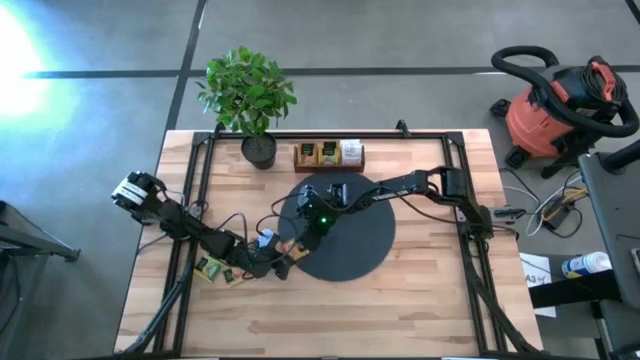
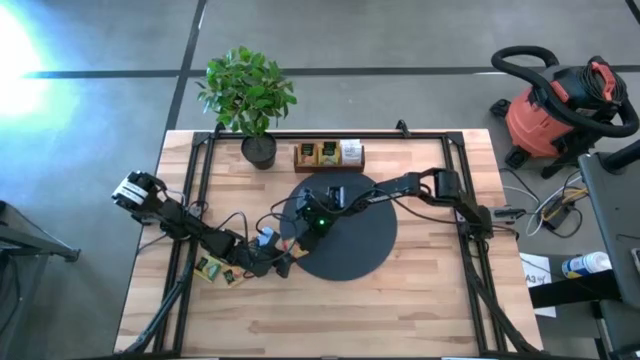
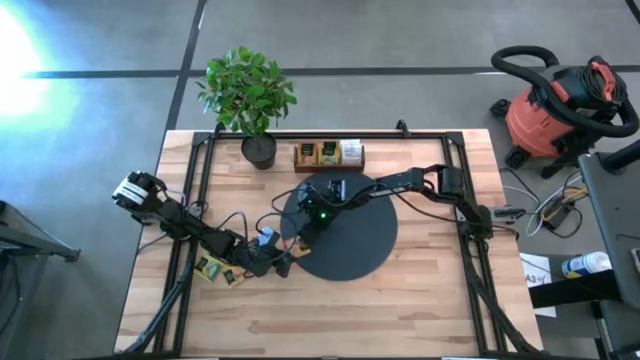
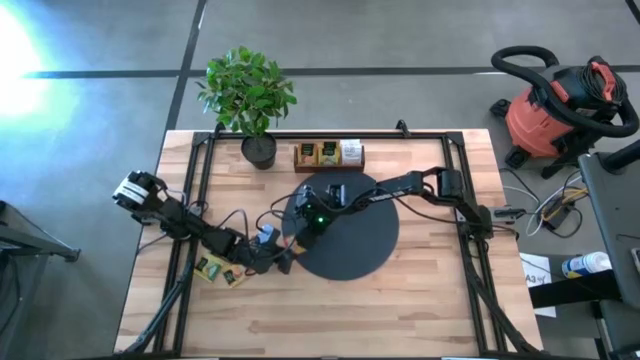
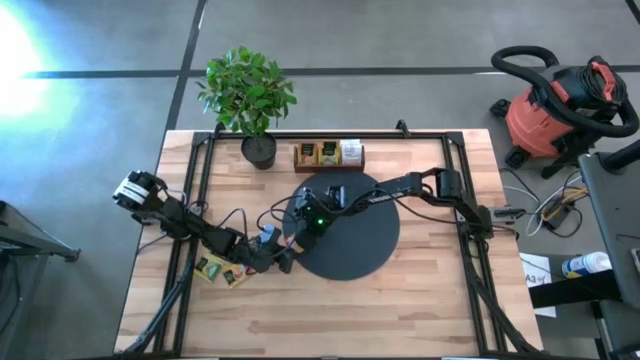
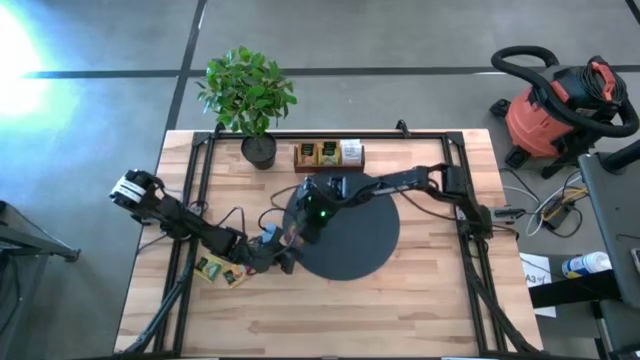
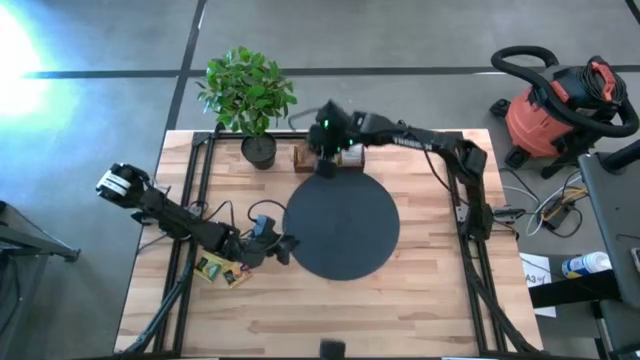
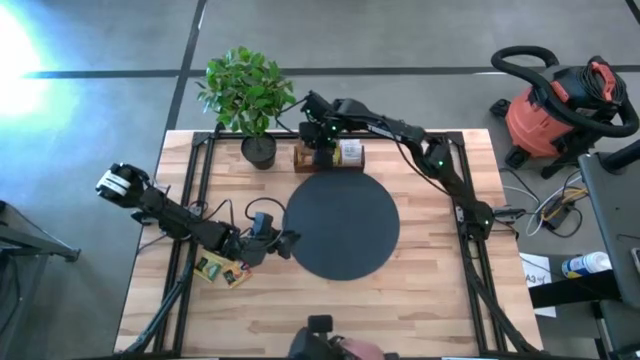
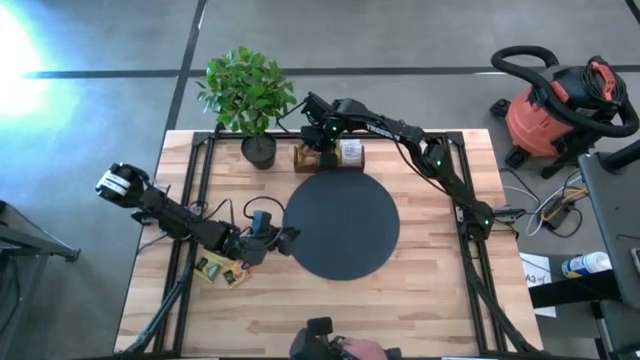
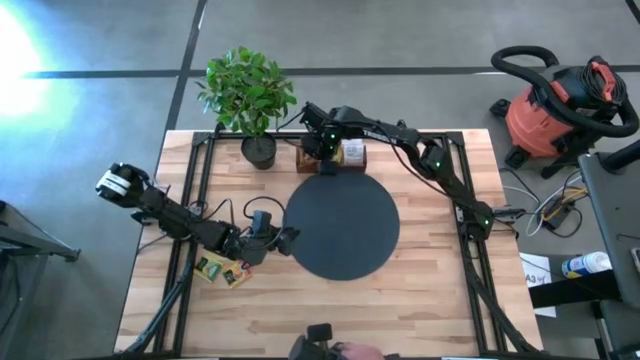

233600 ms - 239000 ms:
Task: Pick & Place Tea
Put the bottom orange tea bag into the left slot of the wooden organizer

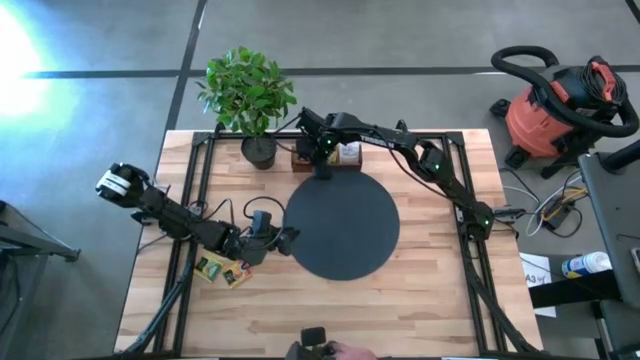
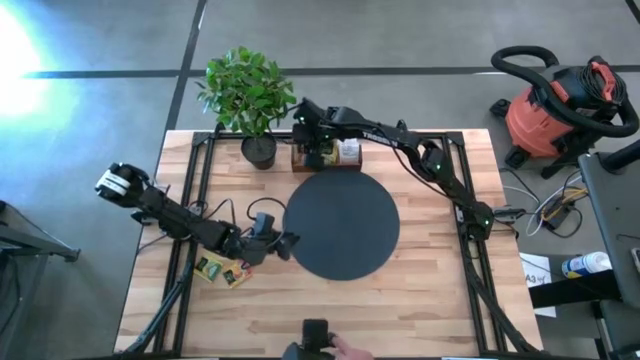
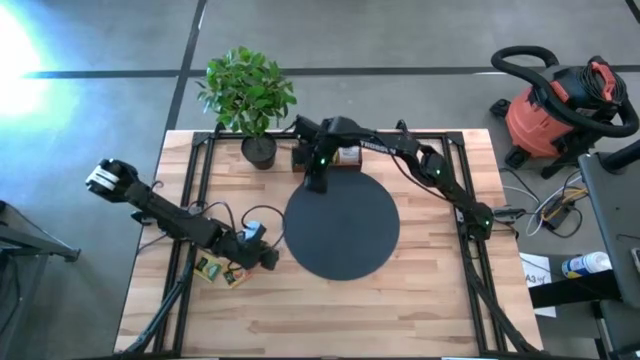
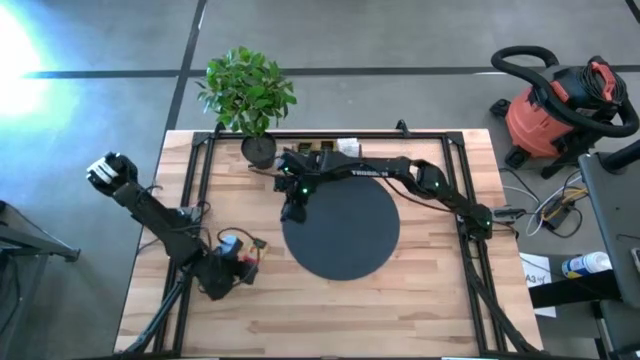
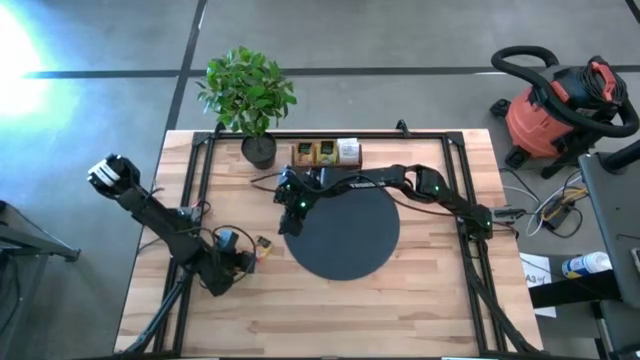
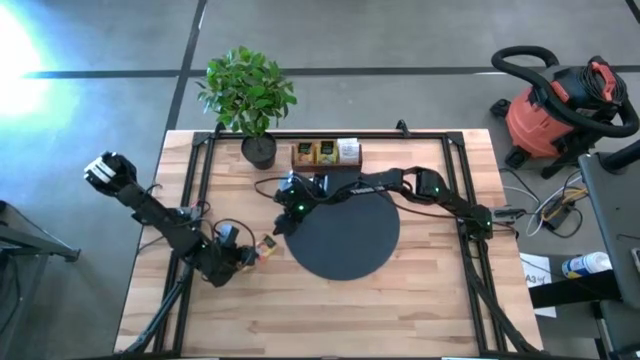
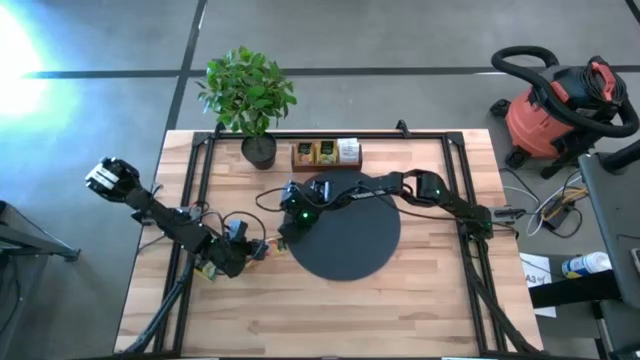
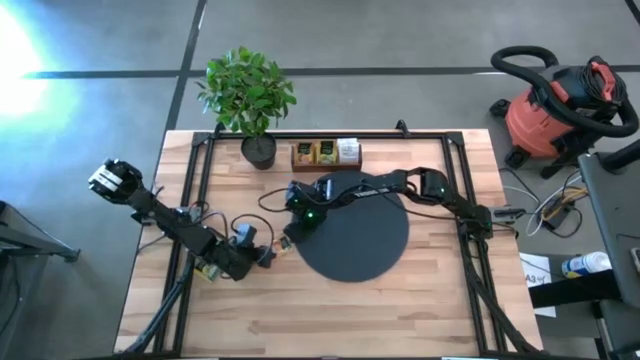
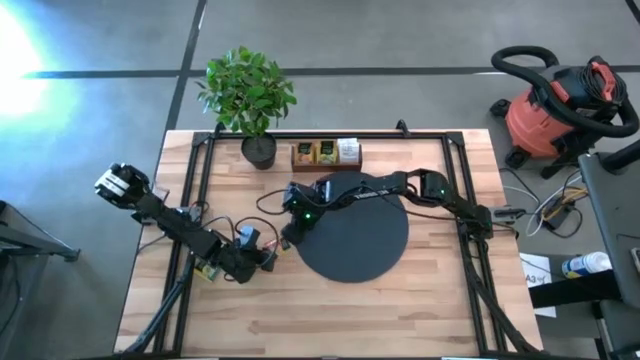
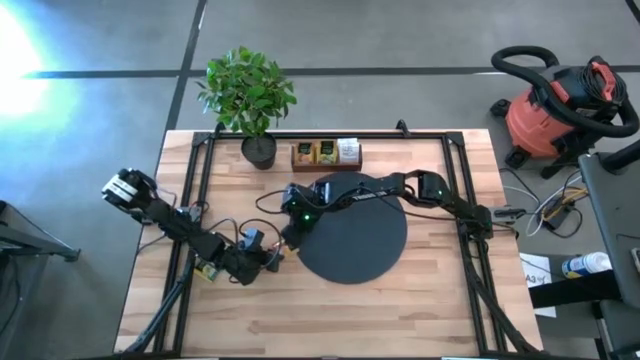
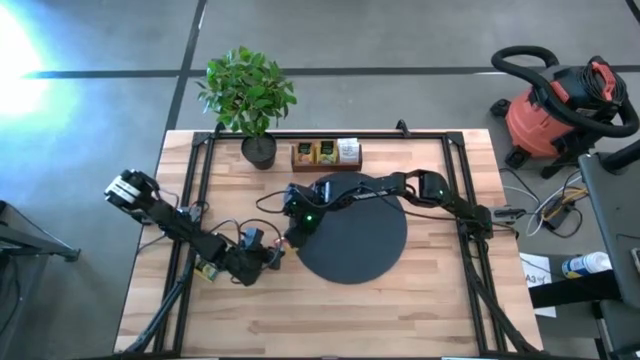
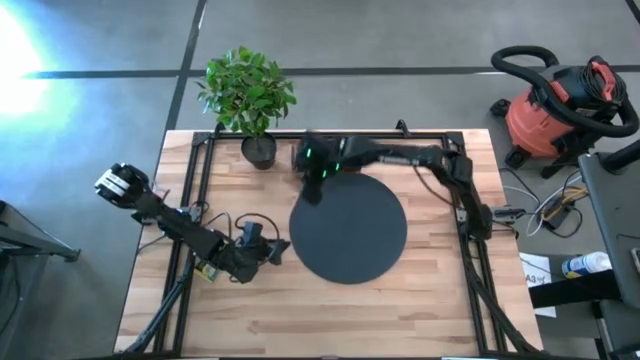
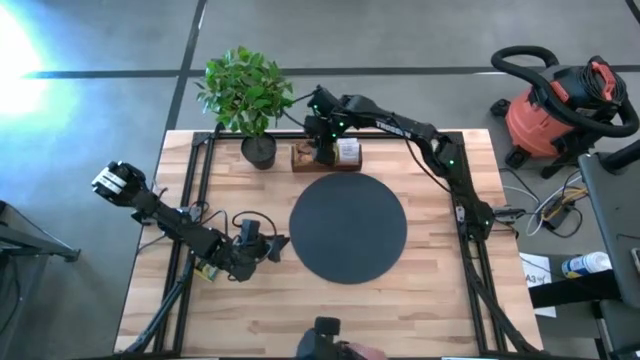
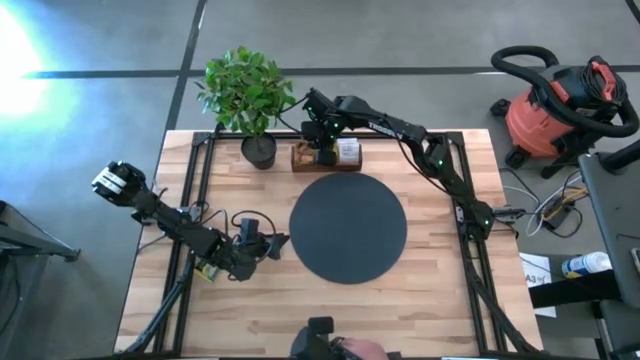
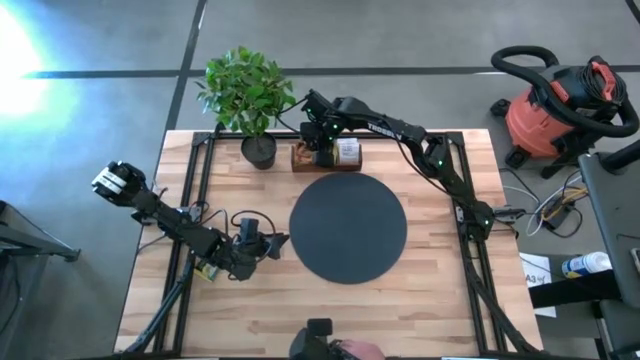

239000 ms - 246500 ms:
Put the top orange tea bag into the left slot of the wooden organizer
